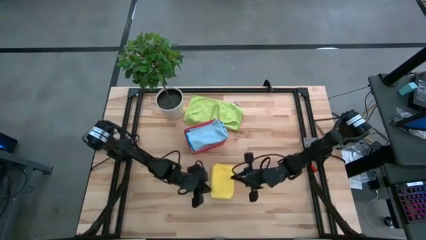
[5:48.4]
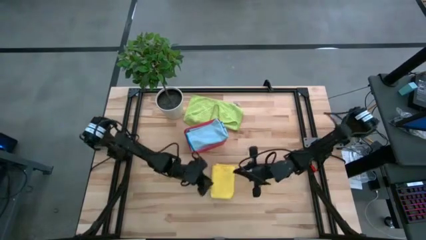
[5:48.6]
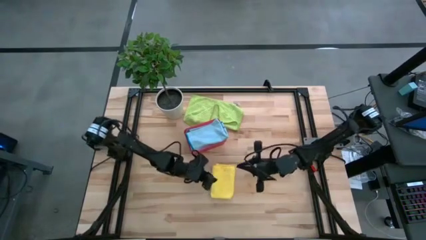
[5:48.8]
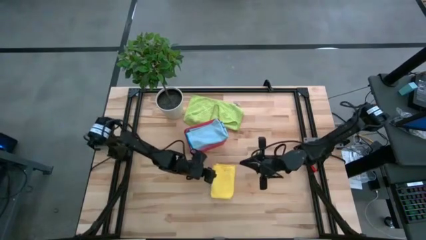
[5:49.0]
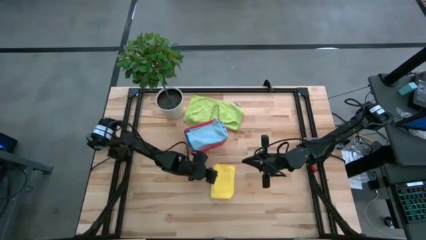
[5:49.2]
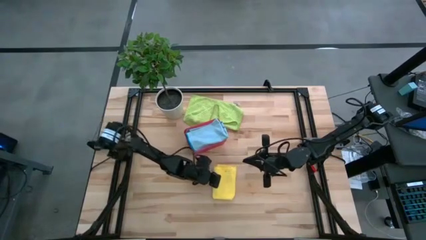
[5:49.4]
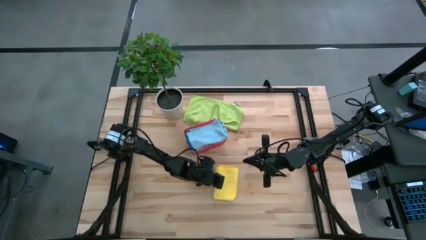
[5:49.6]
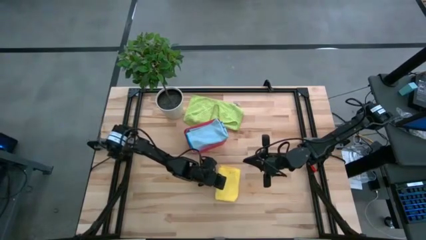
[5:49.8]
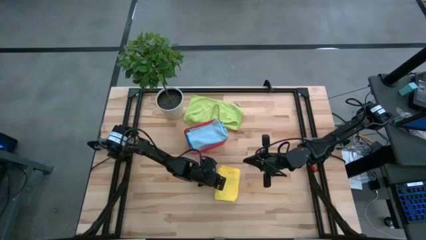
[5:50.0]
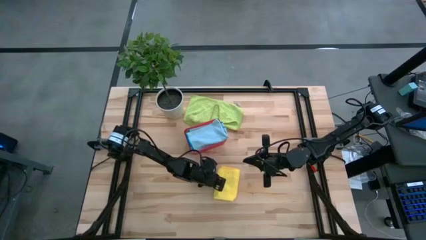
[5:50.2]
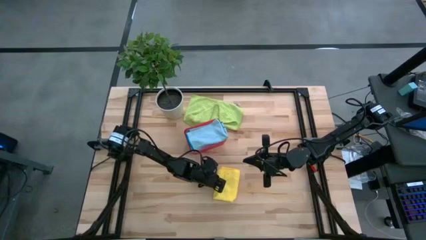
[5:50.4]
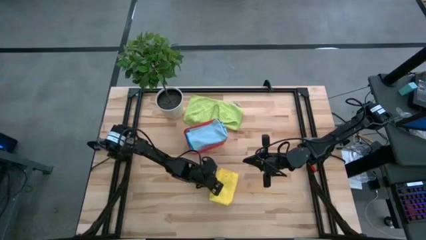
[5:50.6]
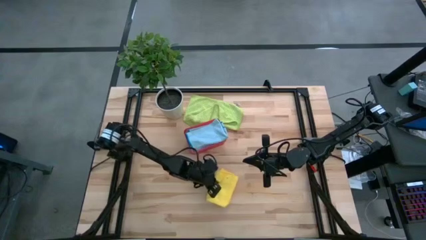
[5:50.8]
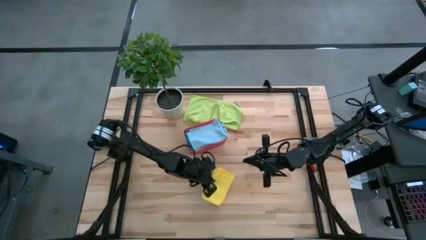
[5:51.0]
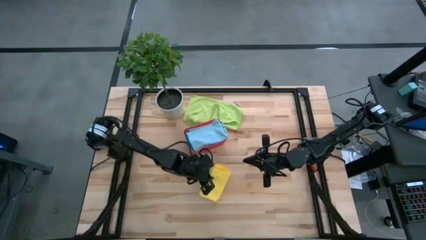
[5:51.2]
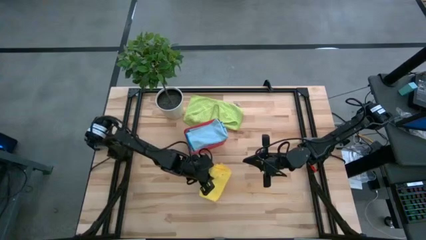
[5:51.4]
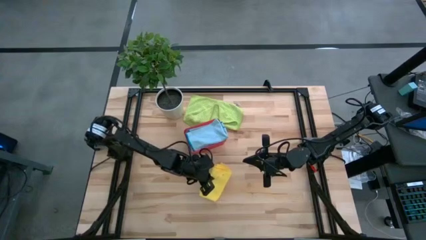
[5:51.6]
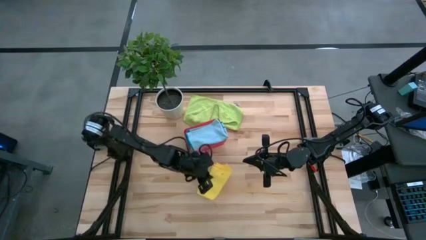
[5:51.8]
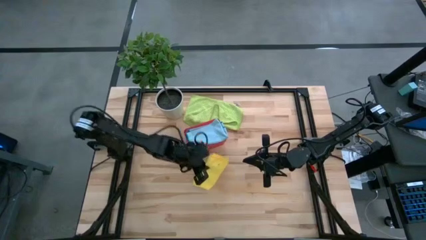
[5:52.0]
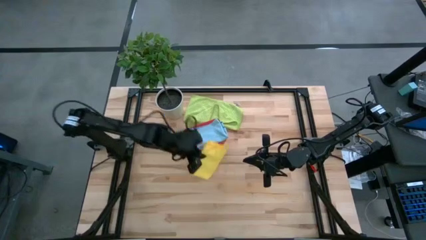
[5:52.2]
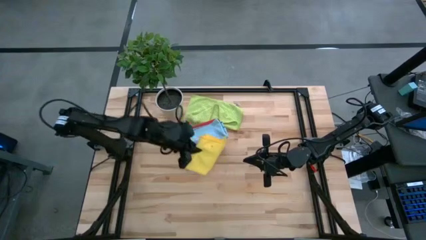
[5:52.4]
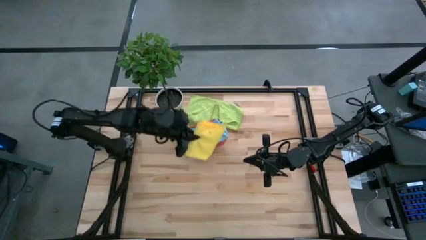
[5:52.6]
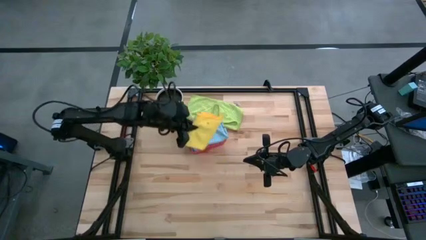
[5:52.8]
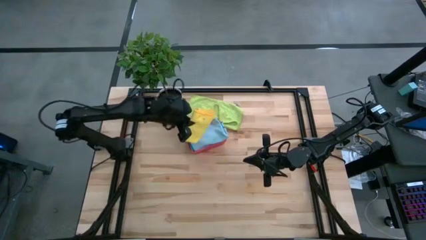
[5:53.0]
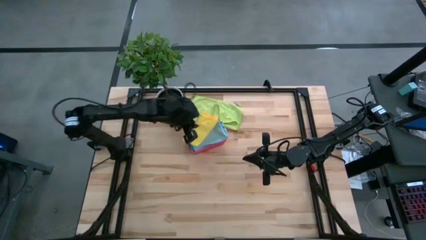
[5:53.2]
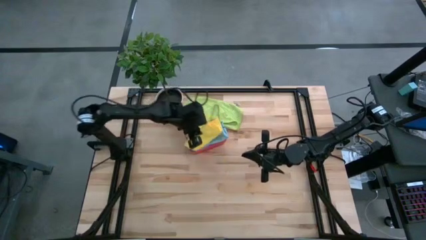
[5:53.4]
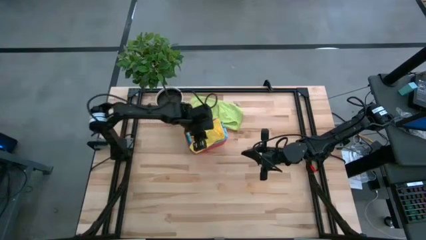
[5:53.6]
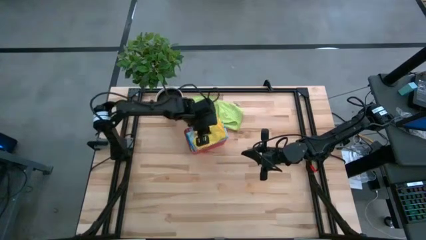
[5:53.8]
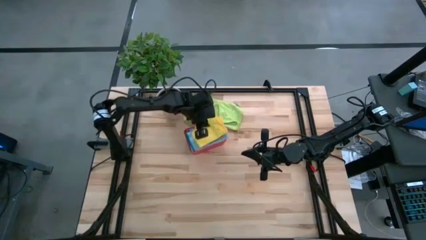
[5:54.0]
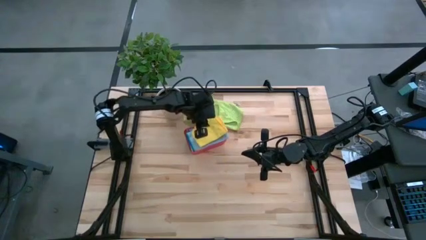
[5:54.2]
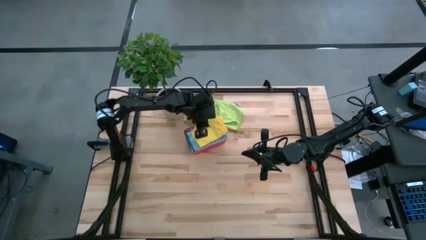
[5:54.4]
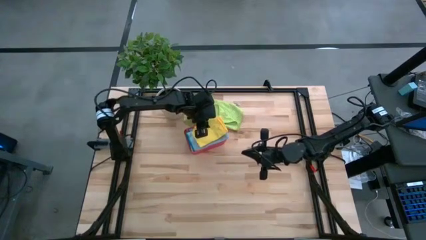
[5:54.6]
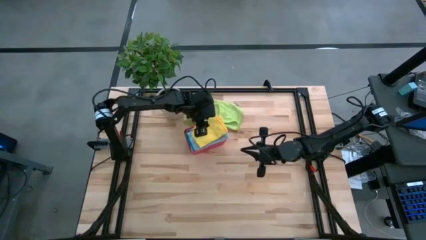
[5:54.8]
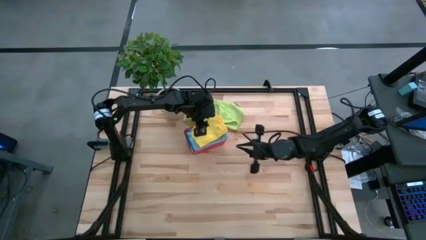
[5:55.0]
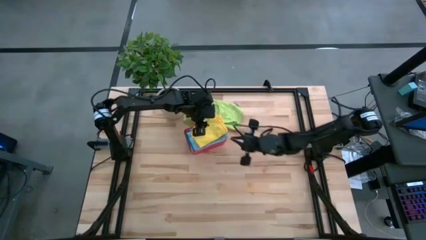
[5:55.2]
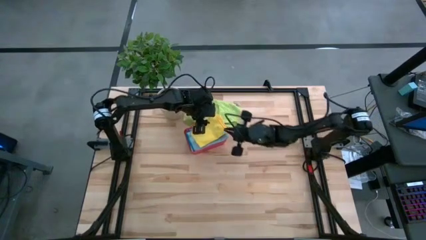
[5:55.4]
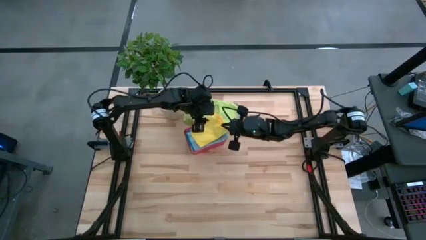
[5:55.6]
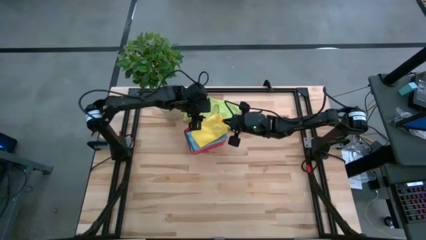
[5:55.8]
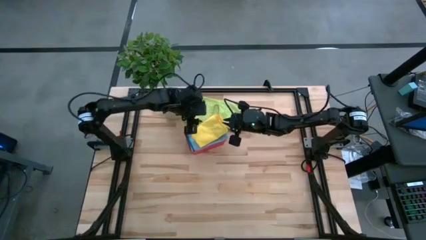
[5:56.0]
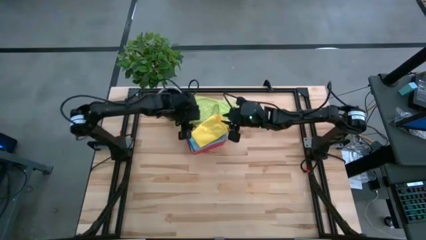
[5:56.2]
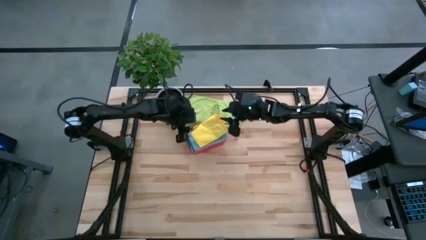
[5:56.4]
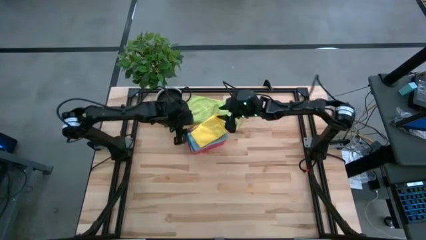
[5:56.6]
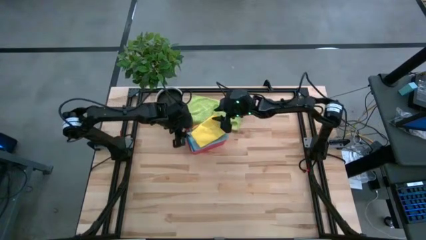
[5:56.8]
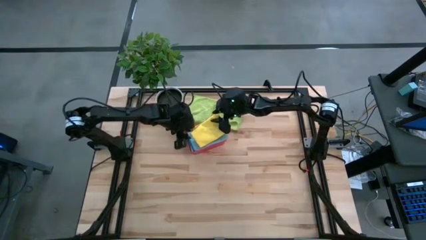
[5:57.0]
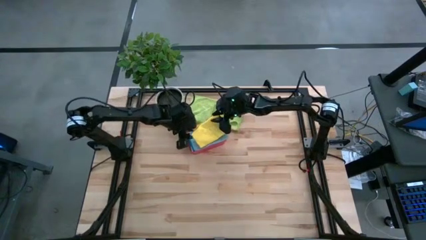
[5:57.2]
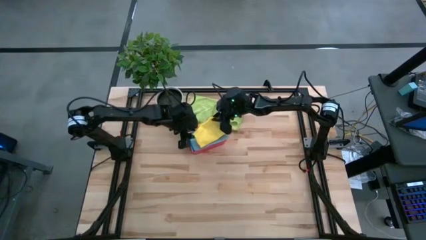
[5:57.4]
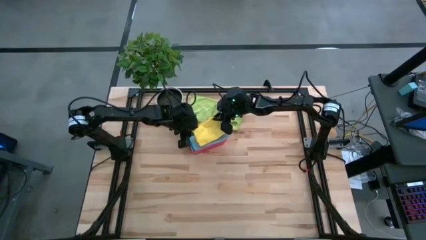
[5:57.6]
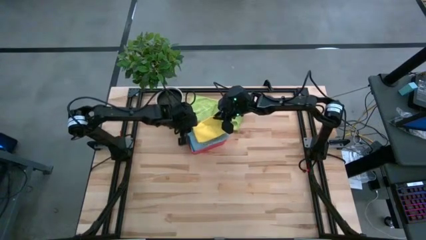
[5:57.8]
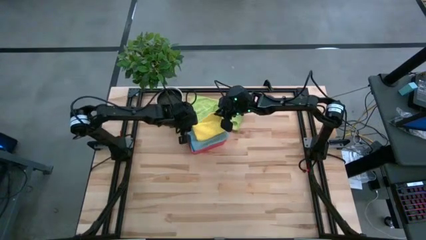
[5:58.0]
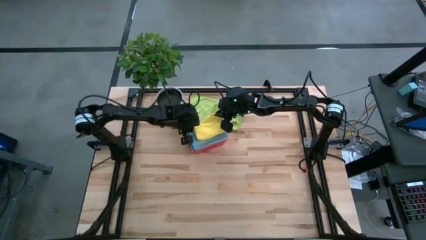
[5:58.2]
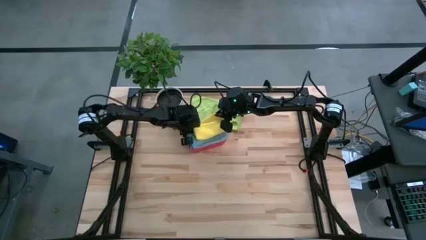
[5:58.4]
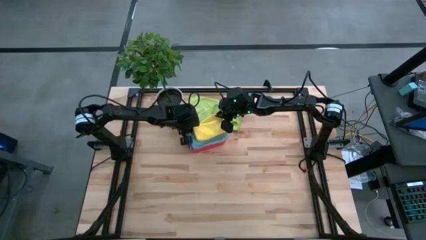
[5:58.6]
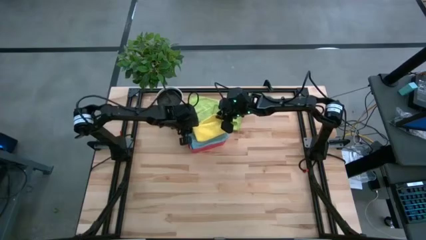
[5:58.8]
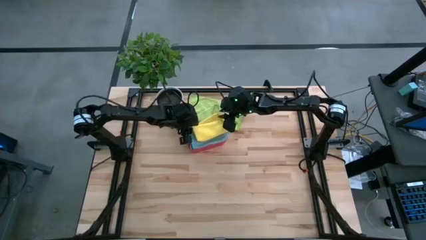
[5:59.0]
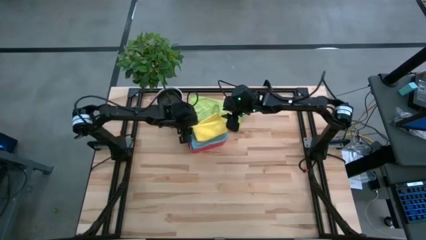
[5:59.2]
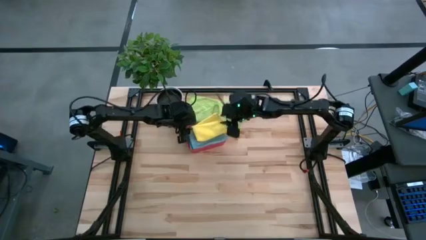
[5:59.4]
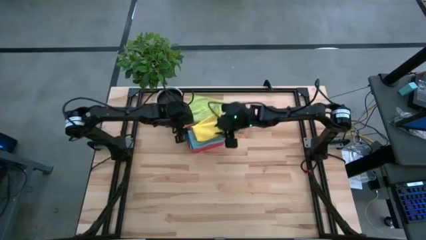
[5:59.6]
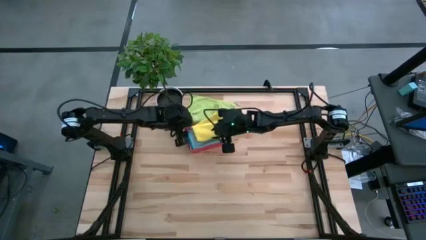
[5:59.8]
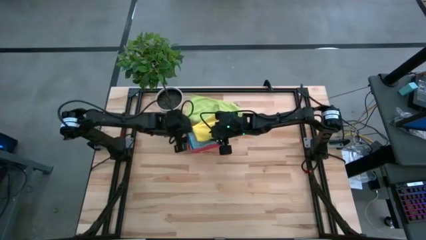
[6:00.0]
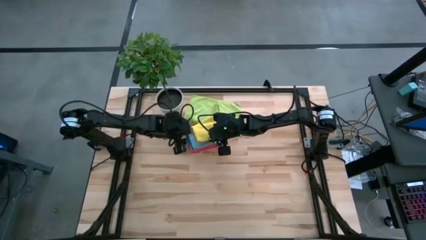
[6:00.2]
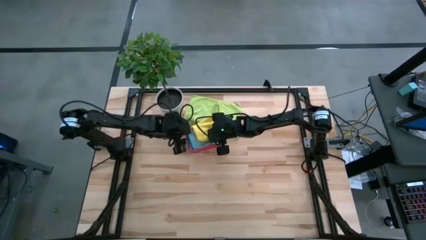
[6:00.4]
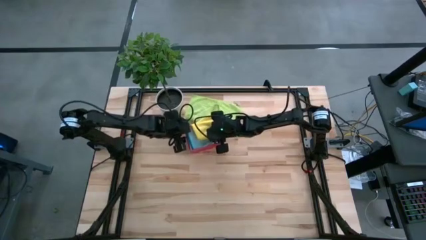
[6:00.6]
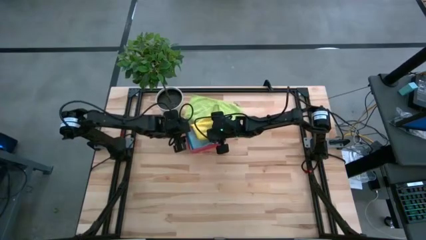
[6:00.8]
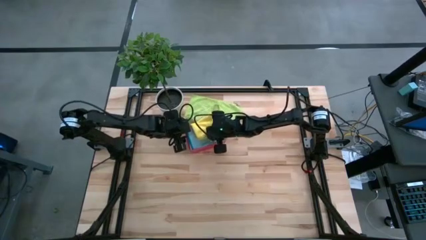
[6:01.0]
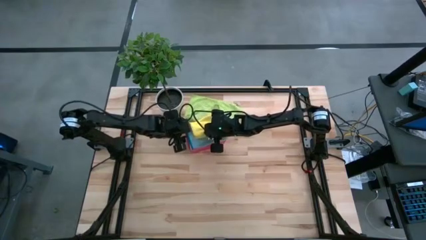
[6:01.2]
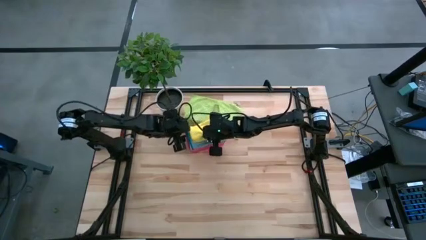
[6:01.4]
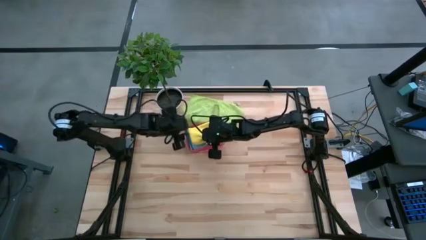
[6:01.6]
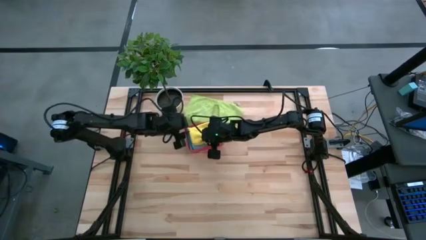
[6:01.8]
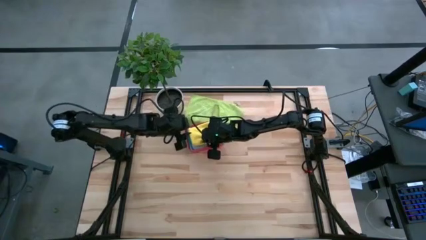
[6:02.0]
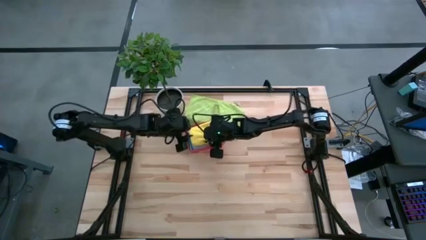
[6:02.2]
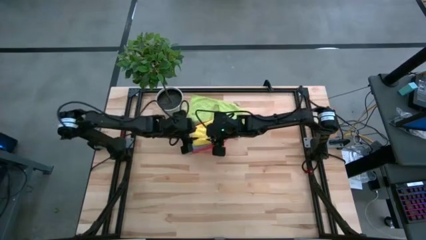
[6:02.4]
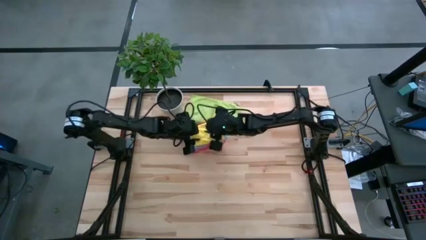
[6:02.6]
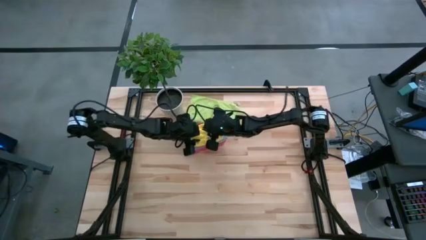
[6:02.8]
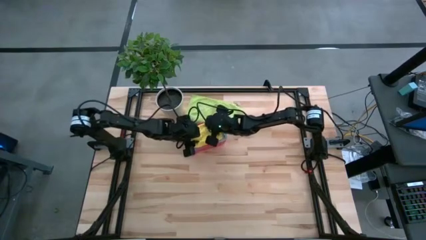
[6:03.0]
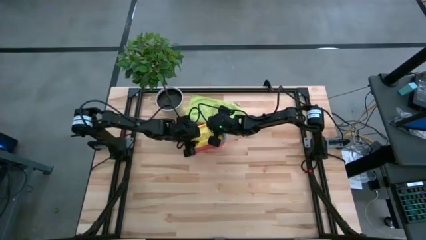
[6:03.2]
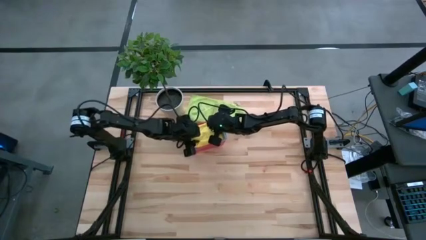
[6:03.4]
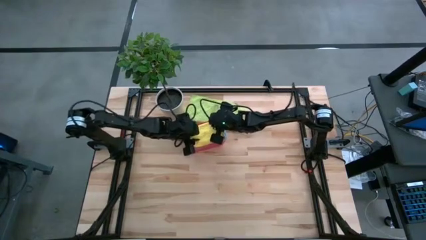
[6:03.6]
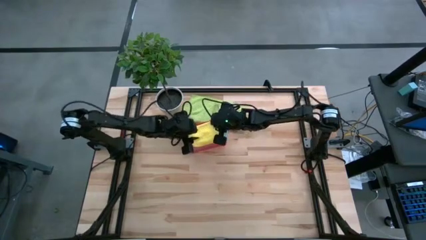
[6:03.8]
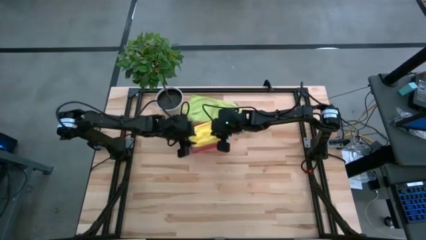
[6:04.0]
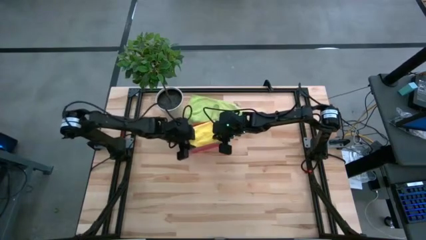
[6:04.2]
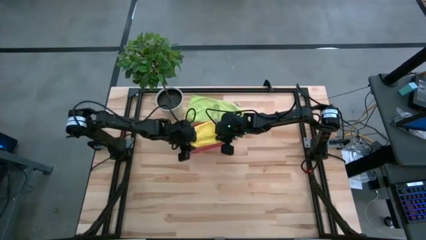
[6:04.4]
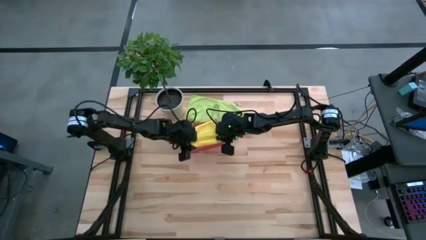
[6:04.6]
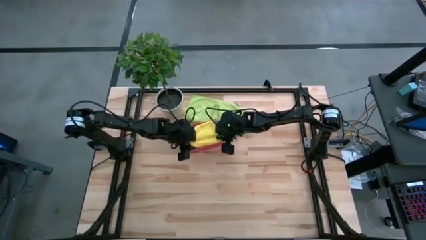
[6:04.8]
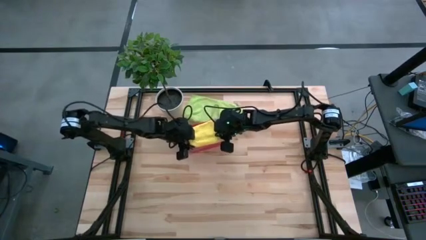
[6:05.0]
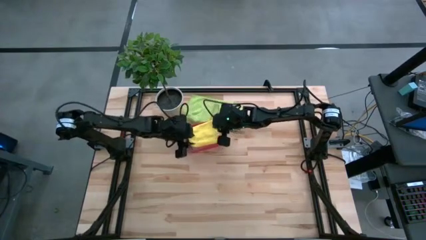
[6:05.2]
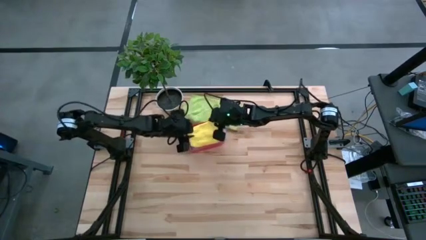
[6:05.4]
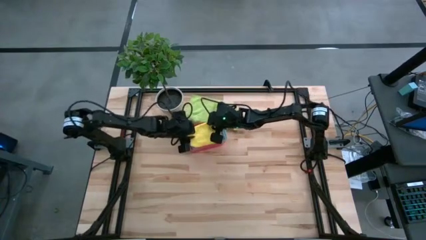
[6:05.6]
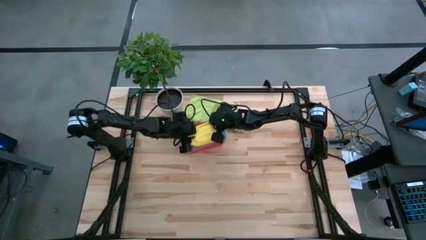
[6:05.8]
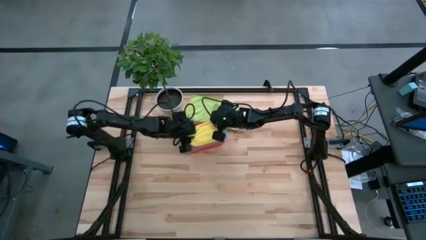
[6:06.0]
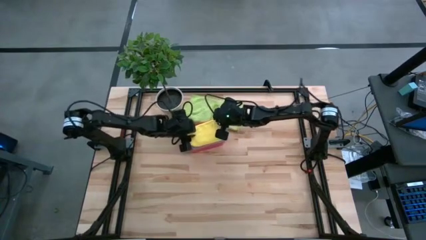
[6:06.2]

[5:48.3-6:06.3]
Task: Fold microfiber towels
Put the folded yellow microfiber cloth into the pink bin
